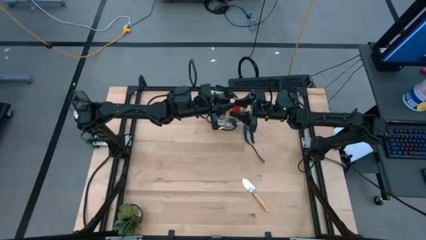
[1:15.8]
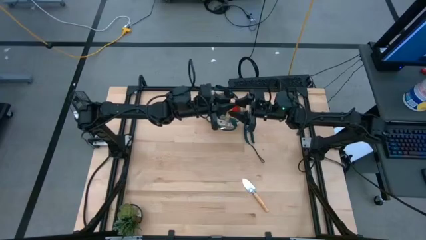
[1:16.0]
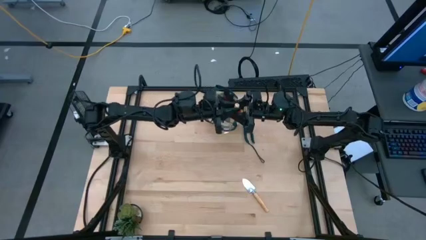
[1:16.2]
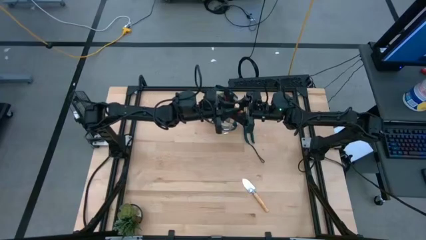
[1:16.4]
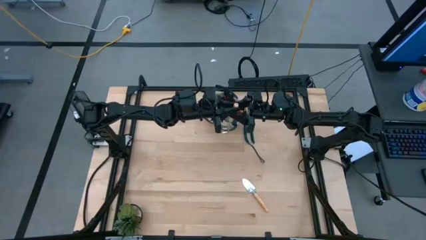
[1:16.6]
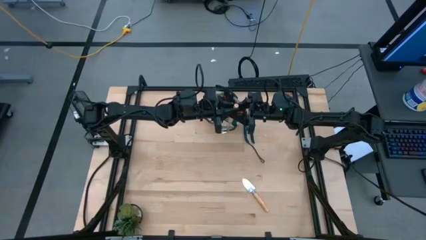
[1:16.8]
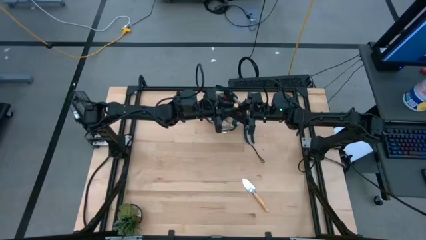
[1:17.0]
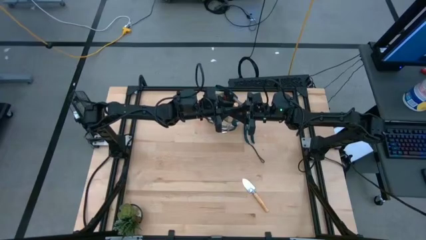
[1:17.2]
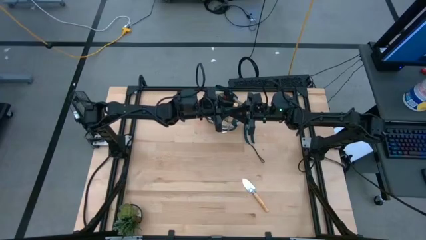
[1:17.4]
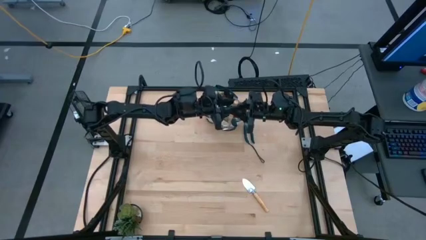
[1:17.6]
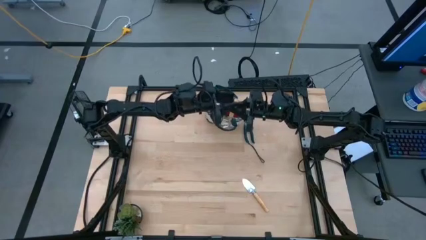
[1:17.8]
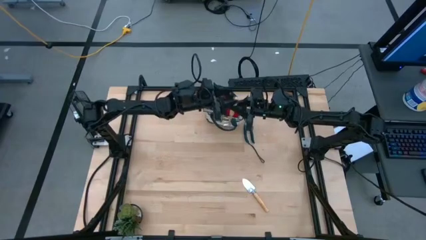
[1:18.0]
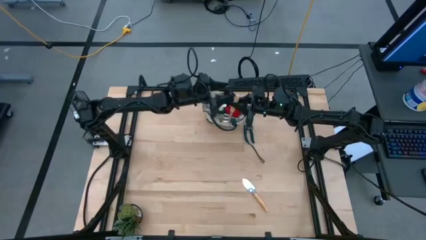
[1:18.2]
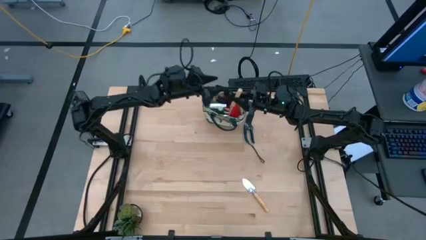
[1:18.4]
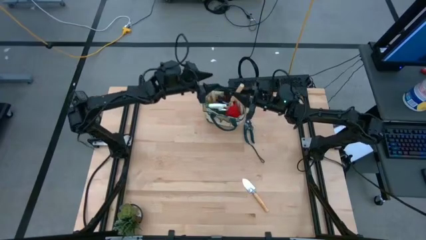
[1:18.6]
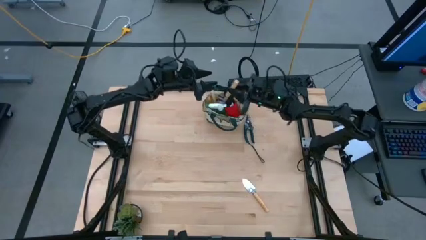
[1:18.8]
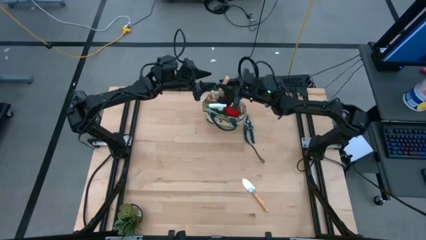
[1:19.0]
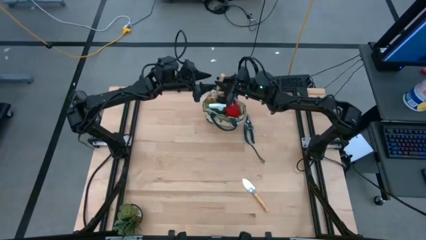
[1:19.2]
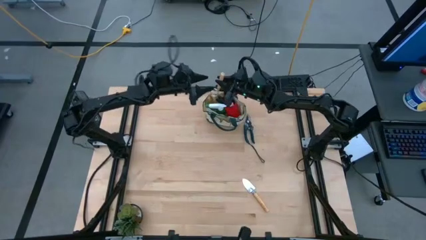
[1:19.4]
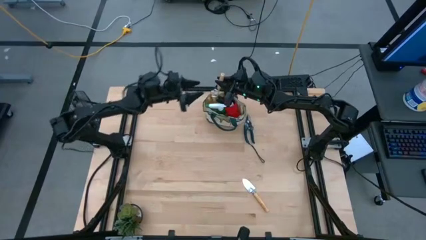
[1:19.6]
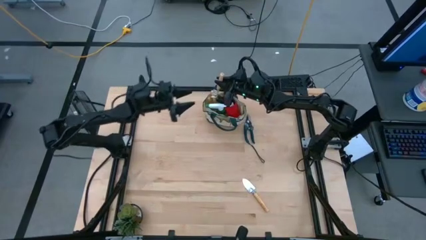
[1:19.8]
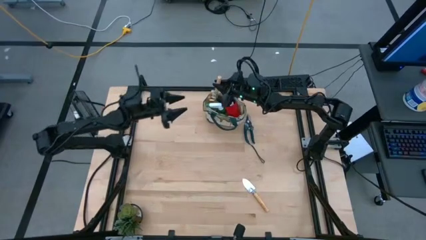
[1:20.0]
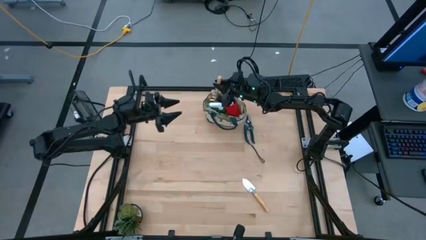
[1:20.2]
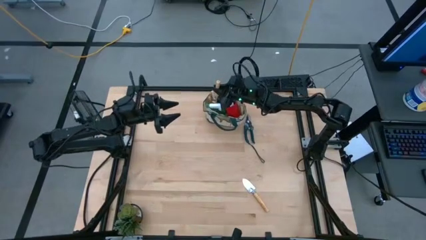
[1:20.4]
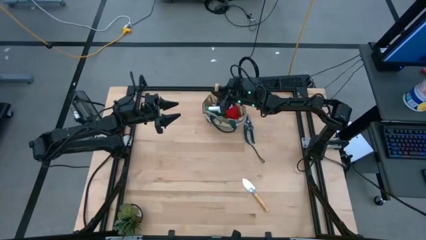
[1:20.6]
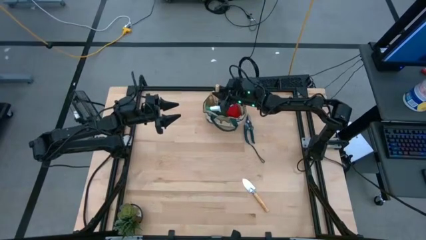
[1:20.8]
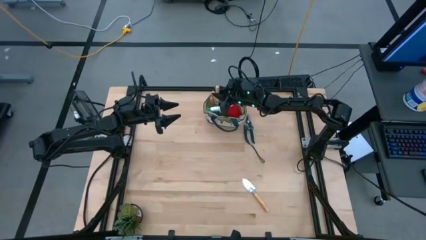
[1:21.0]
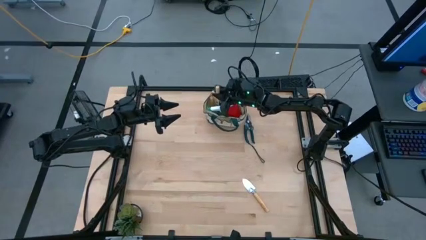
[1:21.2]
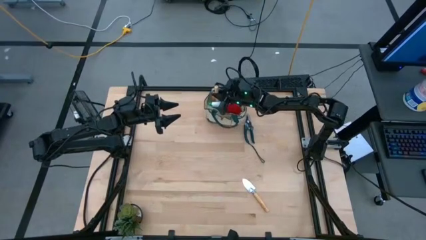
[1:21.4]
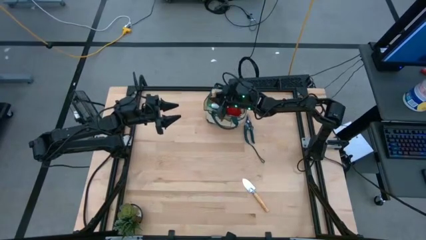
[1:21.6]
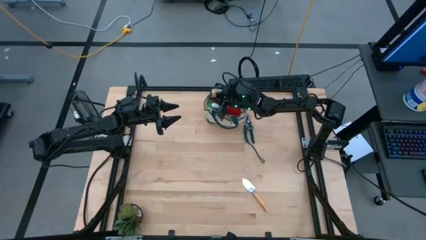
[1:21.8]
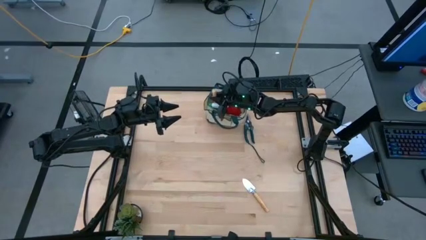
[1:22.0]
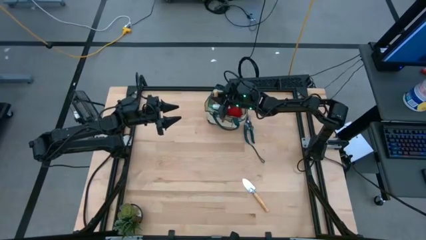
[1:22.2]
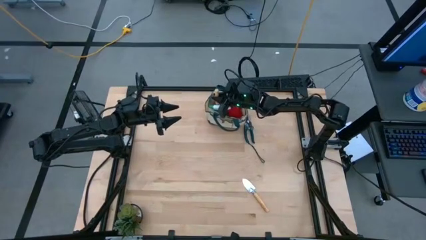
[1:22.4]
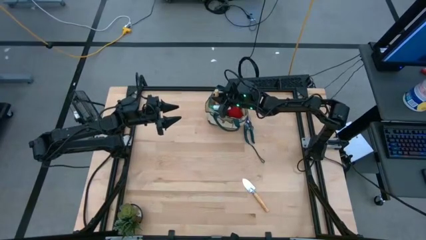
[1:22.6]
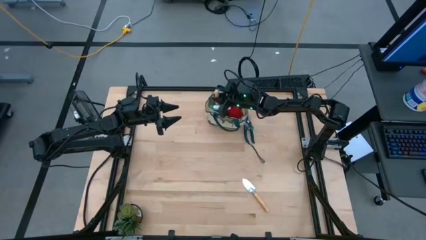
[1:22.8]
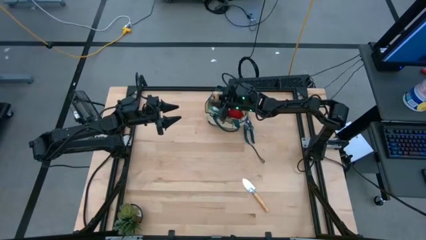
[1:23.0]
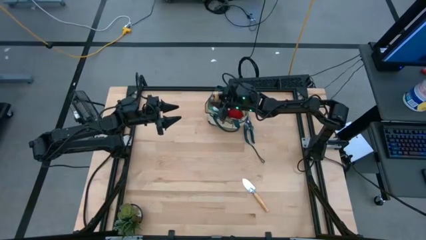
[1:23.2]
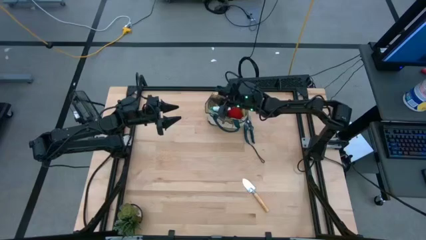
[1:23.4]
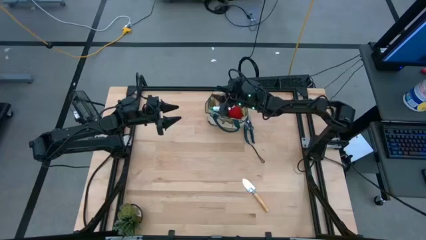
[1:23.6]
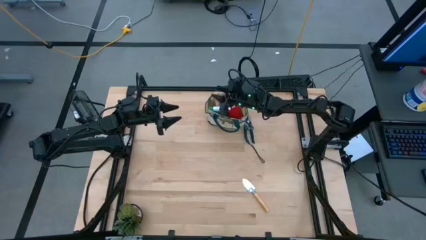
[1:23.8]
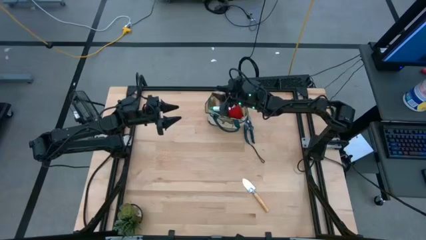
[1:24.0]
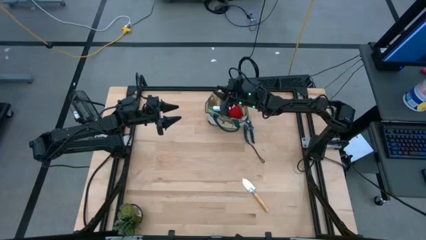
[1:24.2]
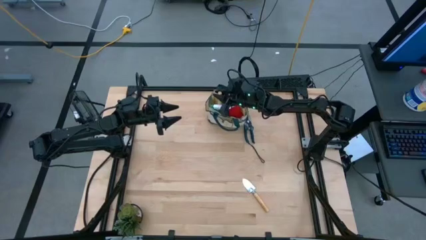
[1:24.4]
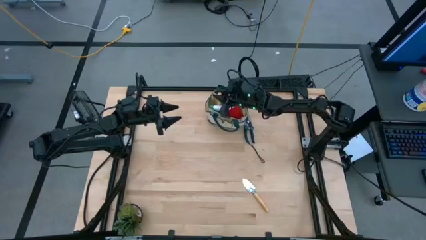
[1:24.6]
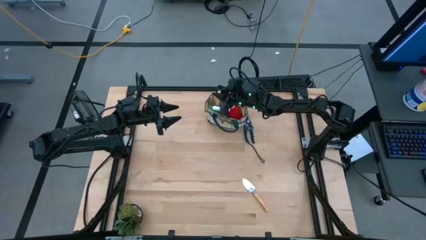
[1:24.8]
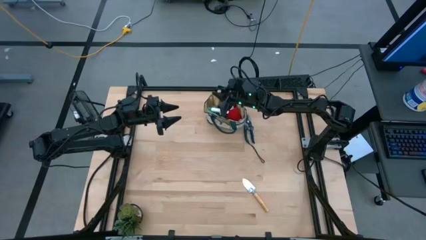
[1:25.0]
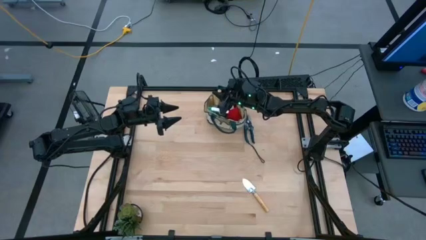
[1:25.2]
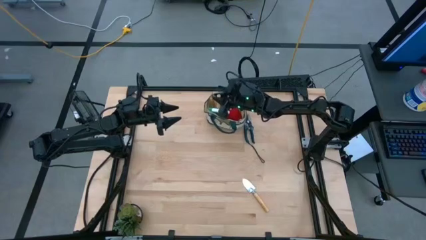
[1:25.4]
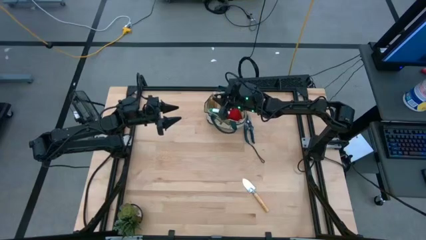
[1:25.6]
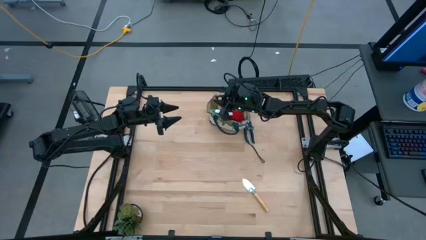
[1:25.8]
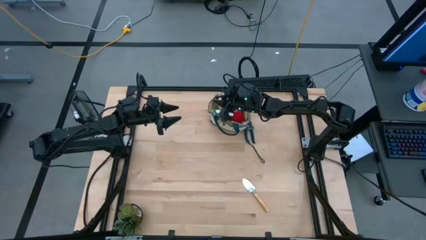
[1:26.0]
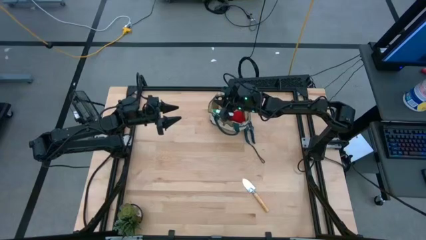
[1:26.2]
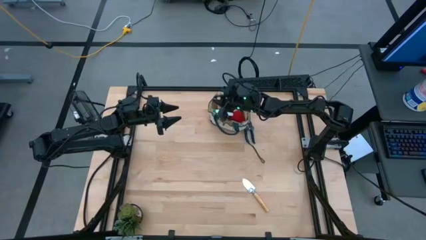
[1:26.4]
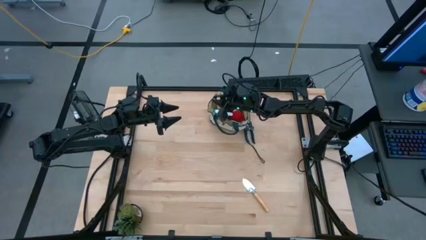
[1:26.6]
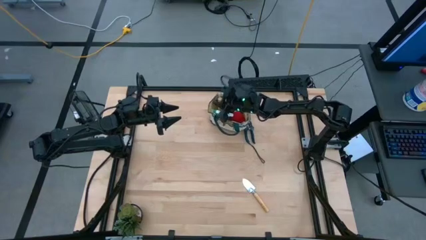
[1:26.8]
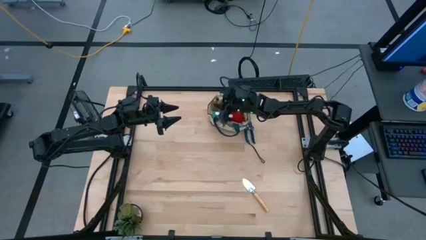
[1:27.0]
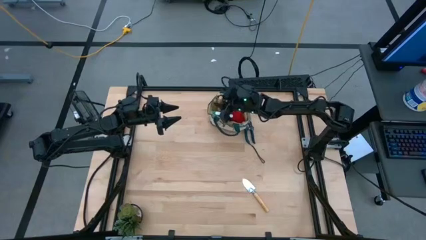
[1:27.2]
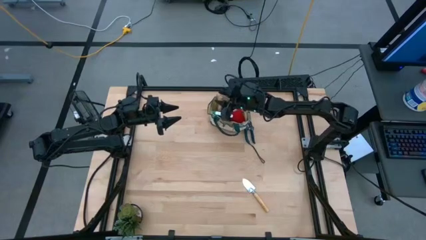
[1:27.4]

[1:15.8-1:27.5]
Task: Pick & Place Garden tools in Gardening bag
Put the brown hand rake into the green gardening bag

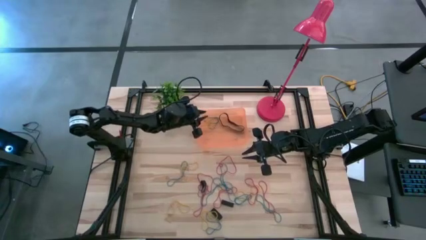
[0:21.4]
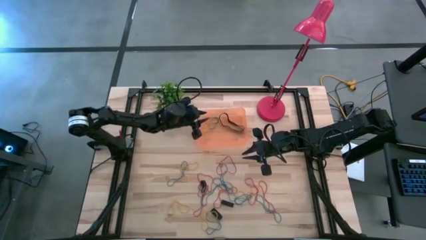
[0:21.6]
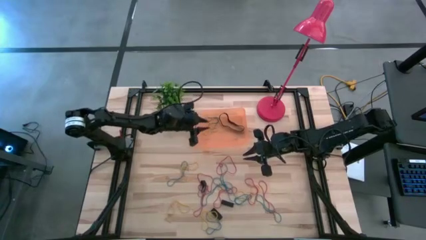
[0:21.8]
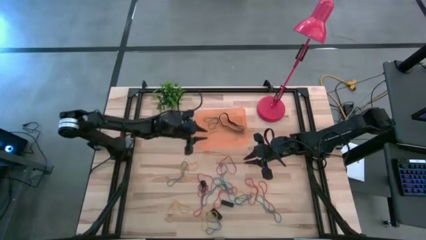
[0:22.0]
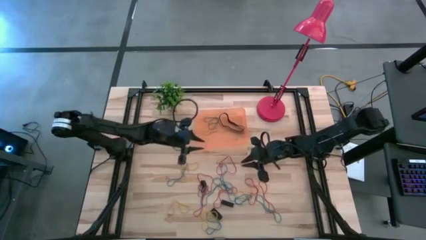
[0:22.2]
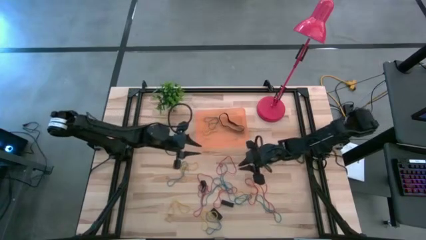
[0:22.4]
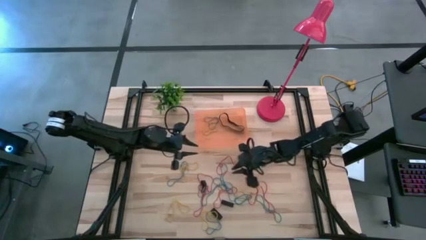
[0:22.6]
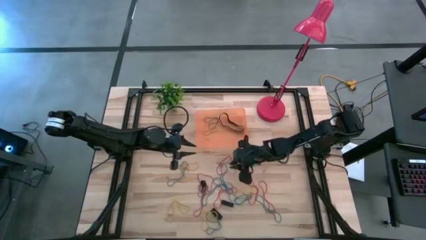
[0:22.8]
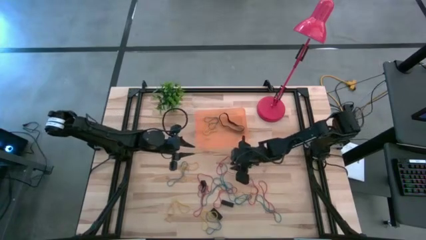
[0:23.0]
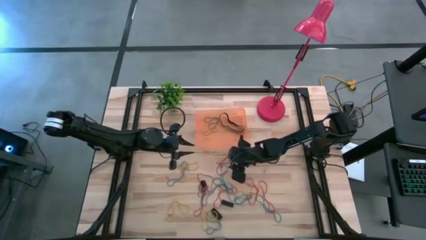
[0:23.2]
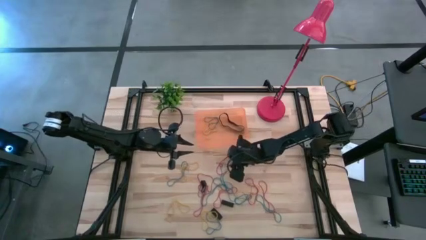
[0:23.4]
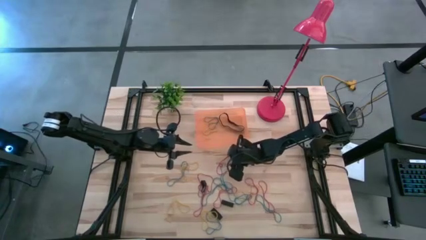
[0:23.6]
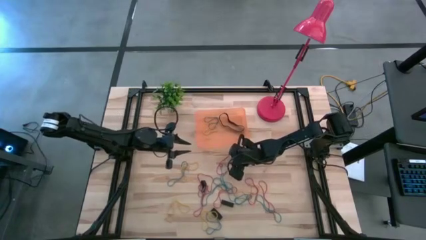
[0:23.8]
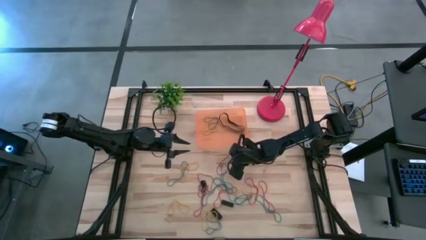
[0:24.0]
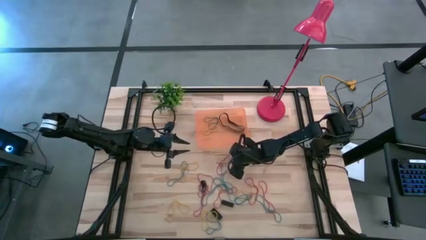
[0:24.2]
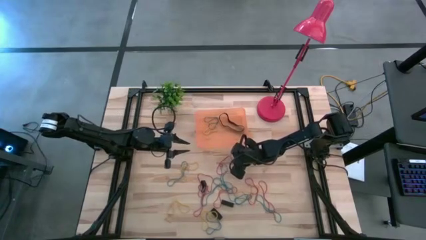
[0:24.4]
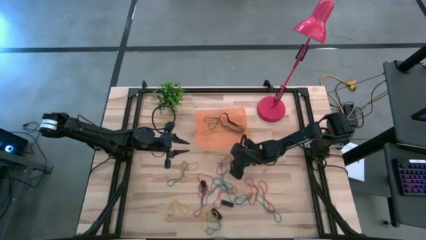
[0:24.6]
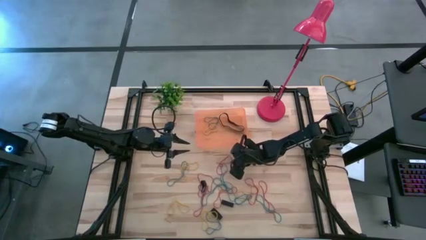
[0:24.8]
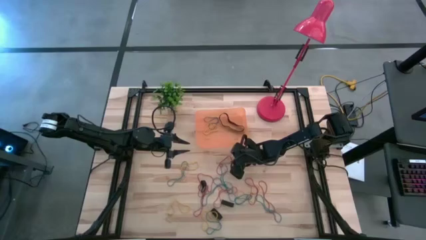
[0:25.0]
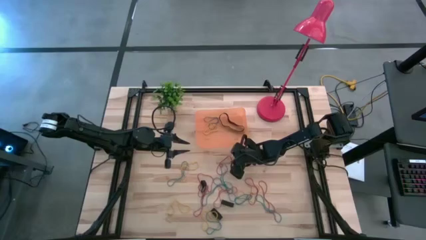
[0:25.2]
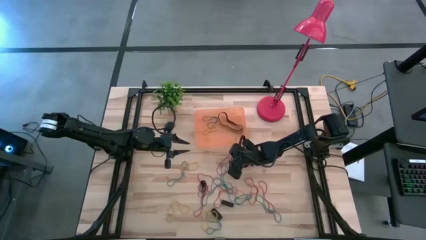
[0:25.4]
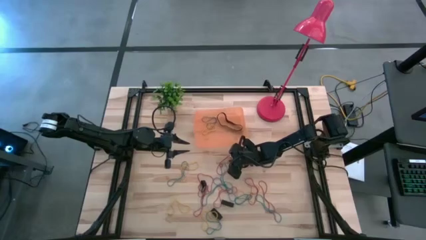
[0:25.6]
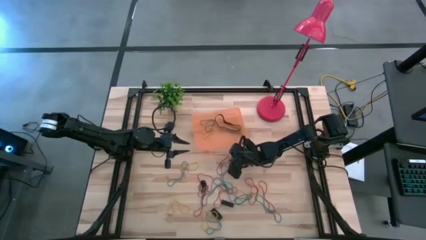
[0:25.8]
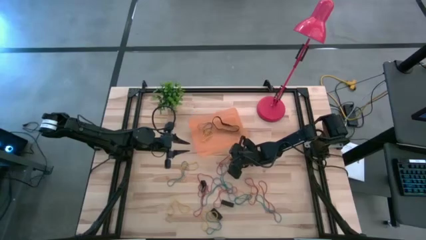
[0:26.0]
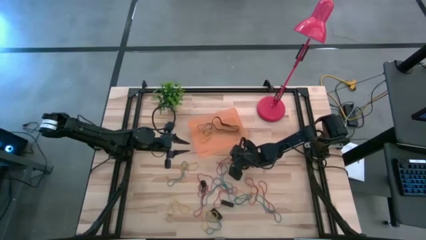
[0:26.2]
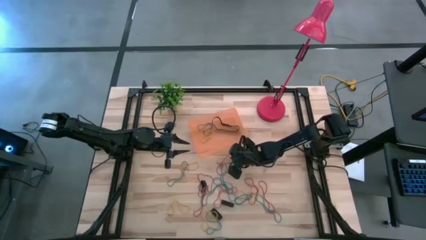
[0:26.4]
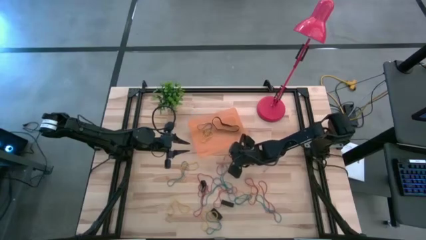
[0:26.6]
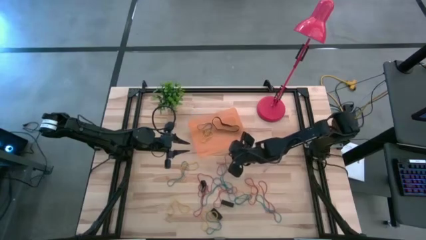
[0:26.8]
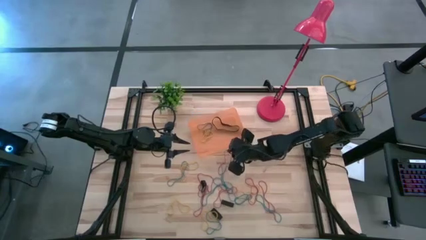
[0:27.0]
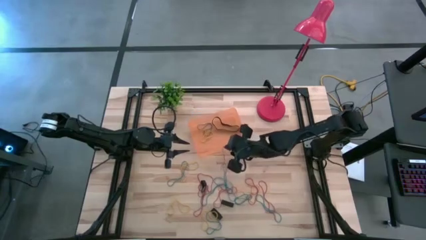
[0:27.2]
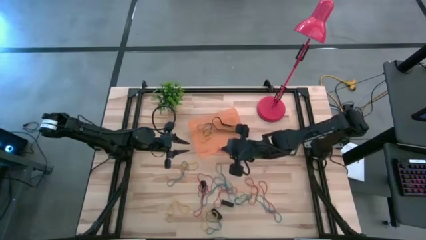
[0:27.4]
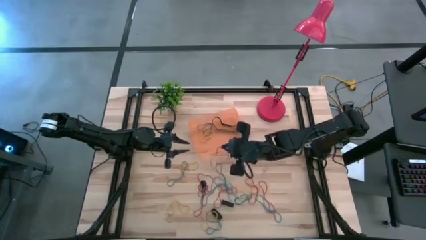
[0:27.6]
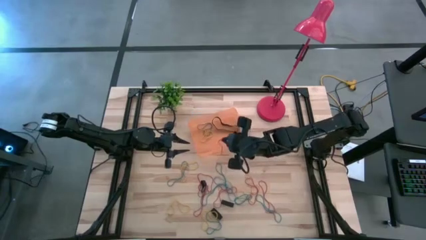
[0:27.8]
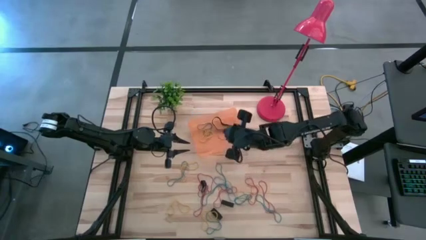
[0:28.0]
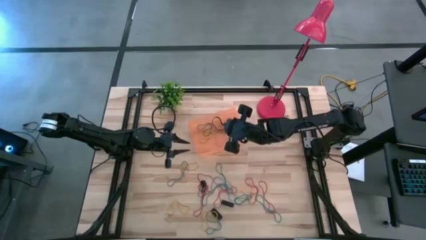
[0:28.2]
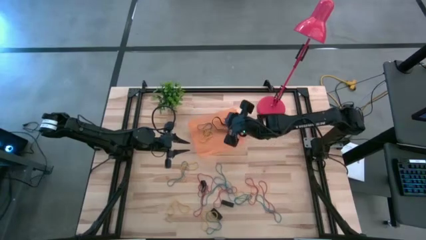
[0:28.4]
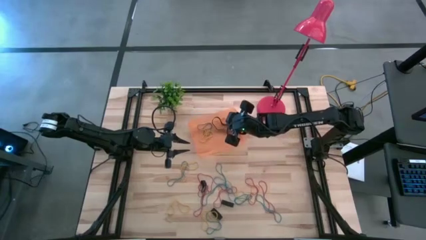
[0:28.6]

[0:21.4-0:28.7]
Task: Pick and place rubber bands into bin
Put the red rubber band into the orange bin
